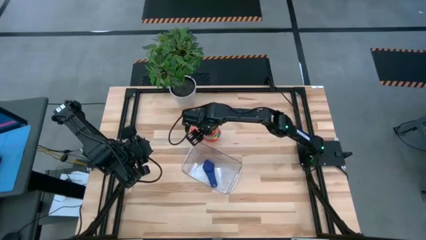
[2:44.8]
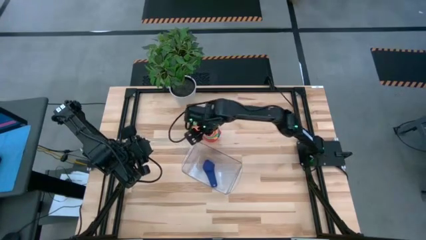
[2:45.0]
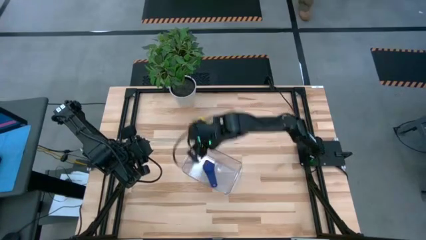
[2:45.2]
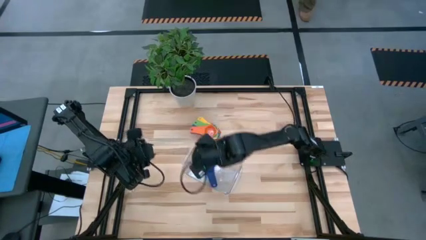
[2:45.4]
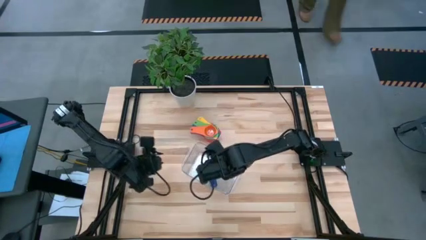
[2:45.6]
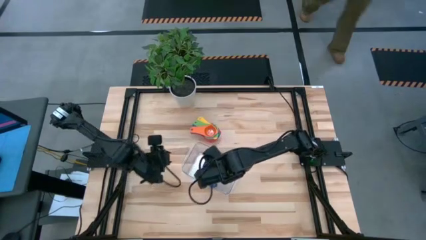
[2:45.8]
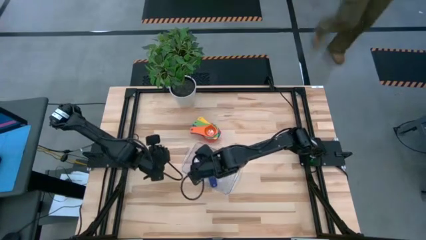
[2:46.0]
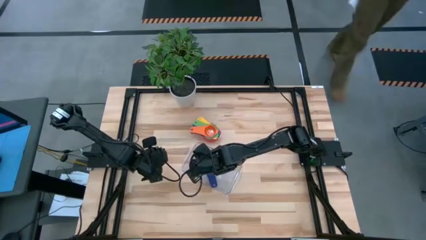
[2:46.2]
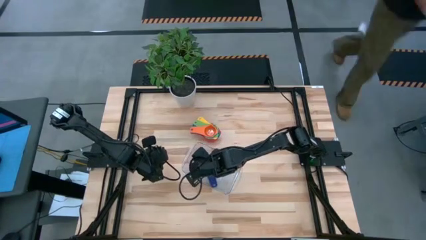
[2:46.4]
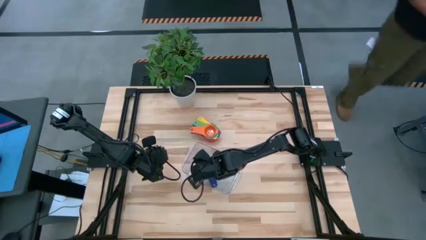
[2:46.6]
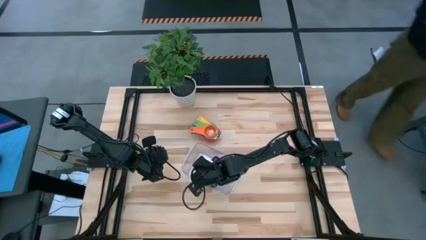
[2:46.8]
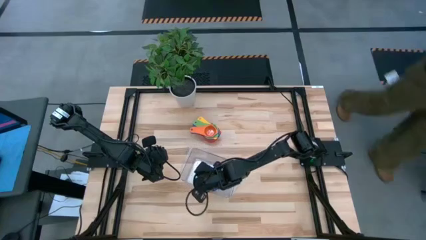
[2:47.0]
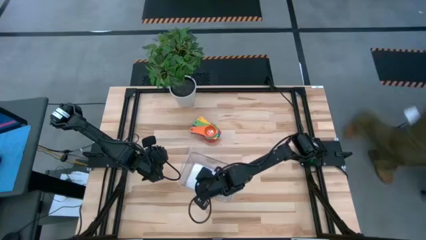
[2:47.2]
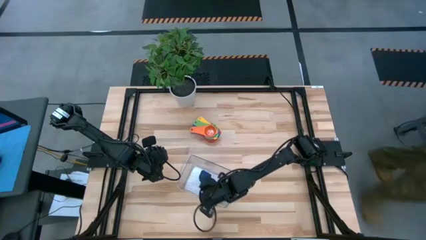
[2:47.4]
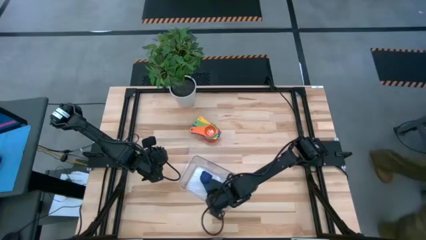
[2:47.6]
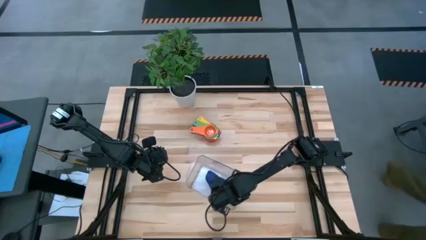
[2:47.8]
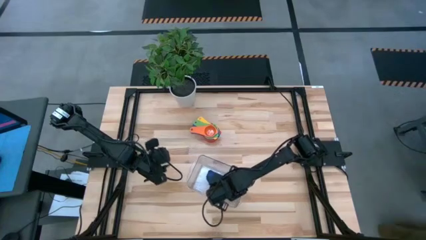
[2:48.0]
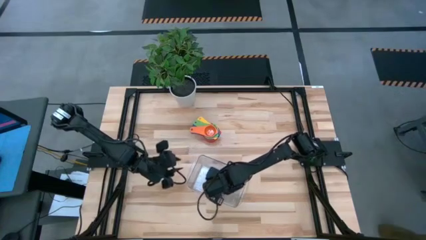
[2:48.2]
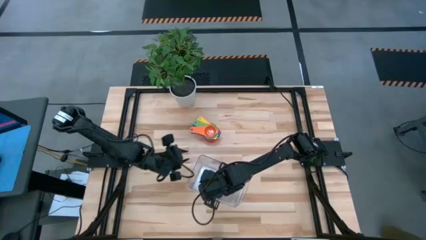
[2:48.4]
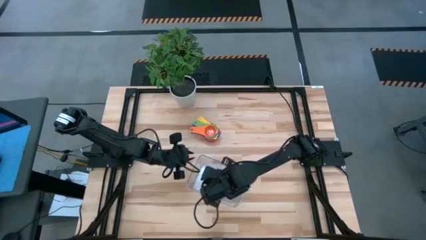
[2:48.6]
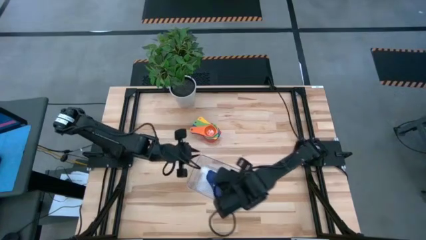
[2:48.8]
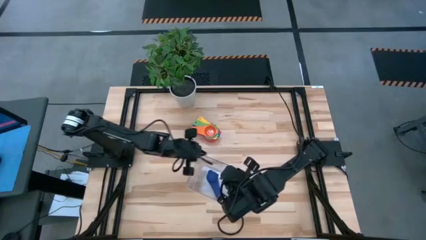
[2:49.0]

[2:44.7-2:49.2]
Task: Nest measuring cups in basket
Adjust the transparent bin on the table

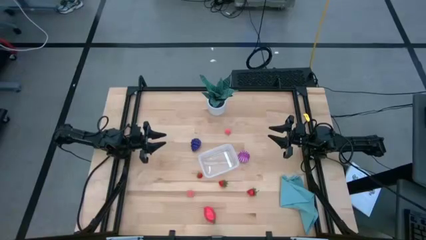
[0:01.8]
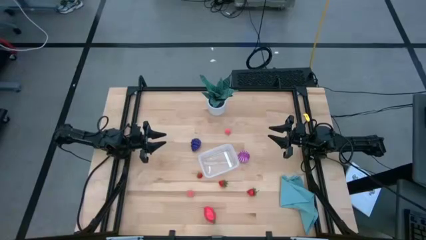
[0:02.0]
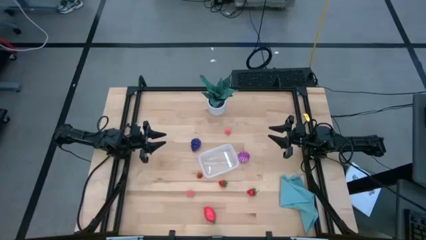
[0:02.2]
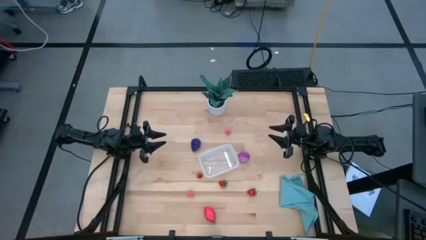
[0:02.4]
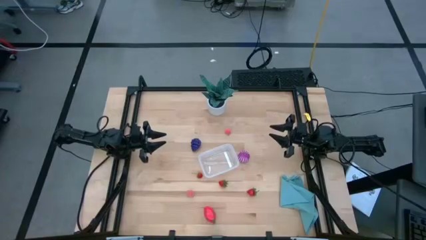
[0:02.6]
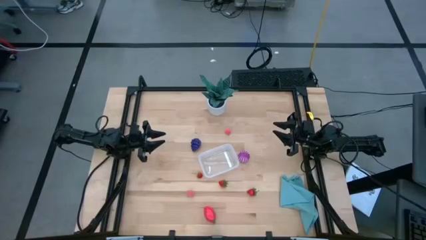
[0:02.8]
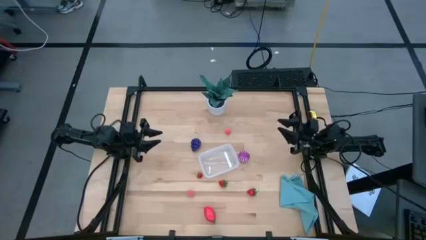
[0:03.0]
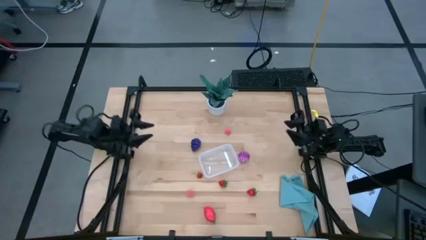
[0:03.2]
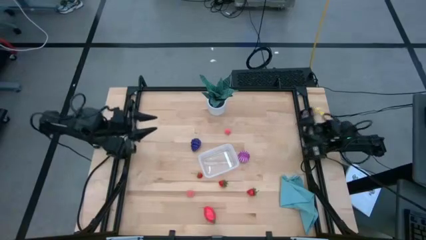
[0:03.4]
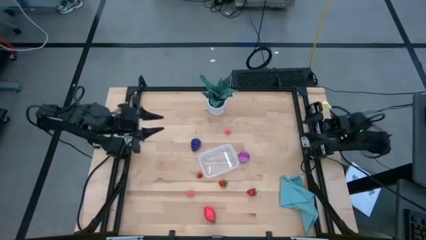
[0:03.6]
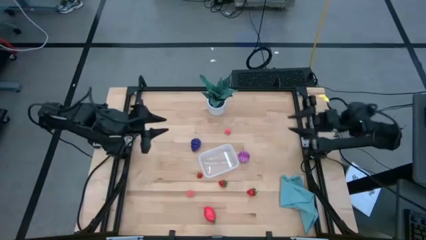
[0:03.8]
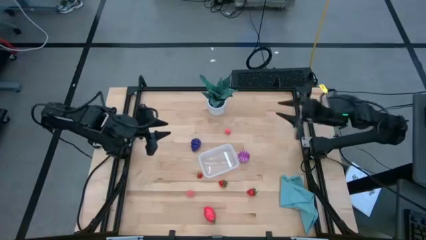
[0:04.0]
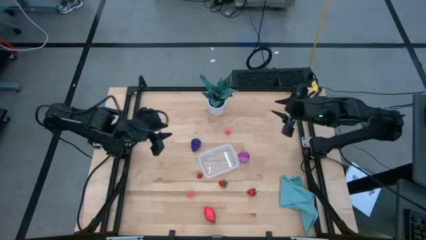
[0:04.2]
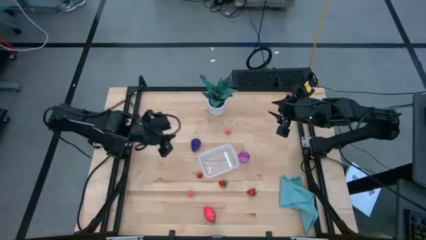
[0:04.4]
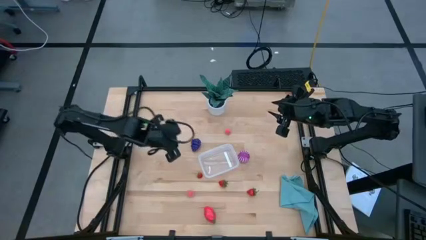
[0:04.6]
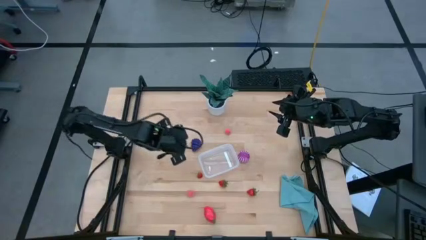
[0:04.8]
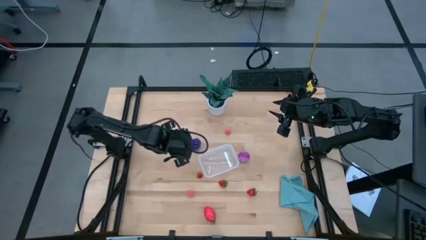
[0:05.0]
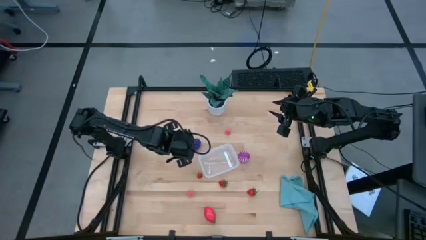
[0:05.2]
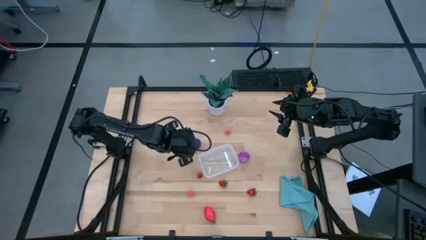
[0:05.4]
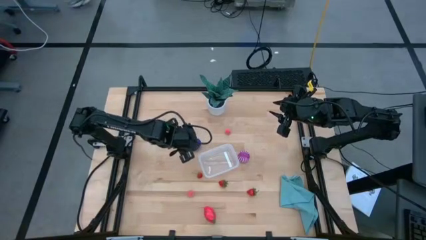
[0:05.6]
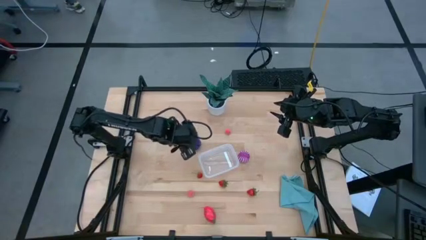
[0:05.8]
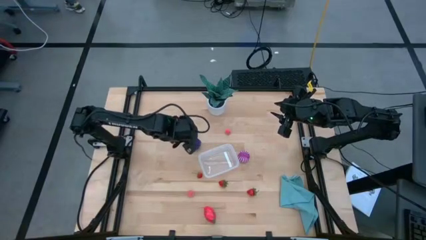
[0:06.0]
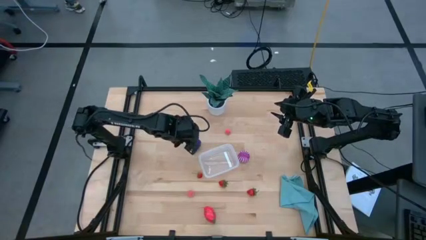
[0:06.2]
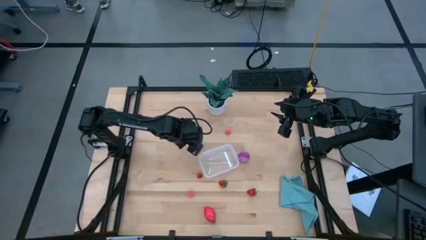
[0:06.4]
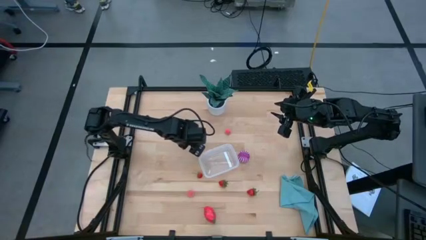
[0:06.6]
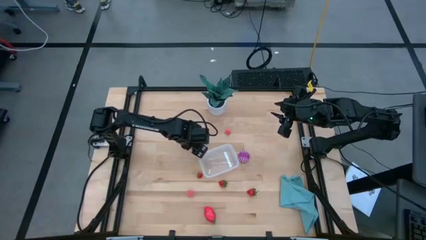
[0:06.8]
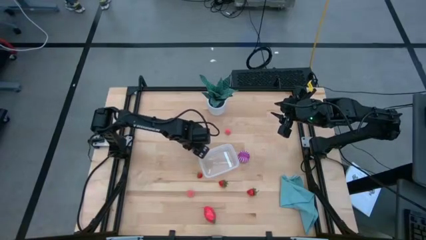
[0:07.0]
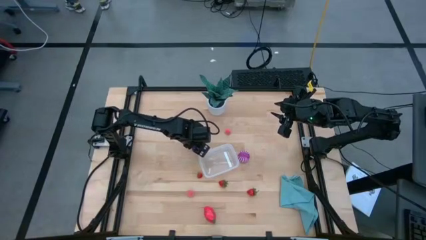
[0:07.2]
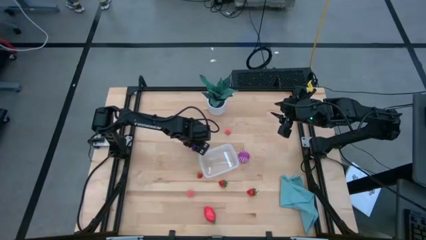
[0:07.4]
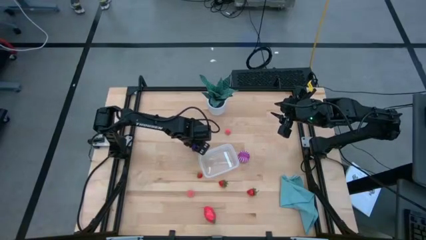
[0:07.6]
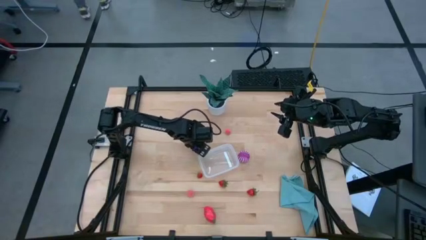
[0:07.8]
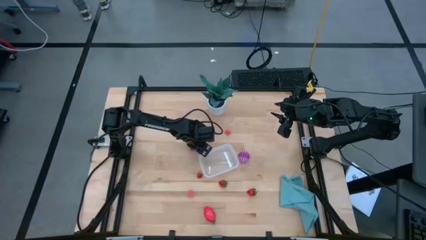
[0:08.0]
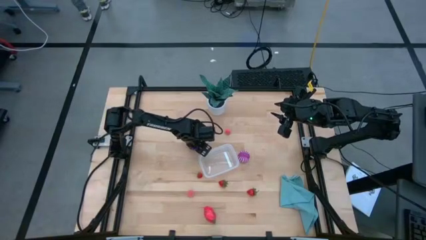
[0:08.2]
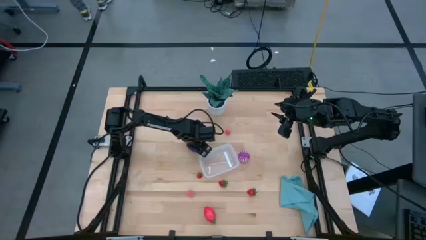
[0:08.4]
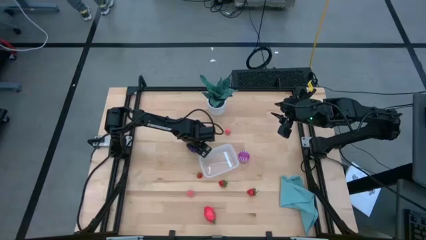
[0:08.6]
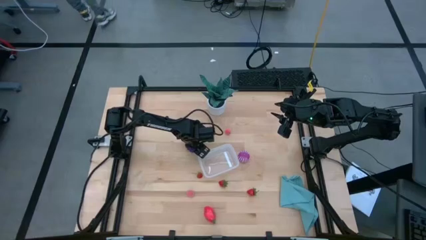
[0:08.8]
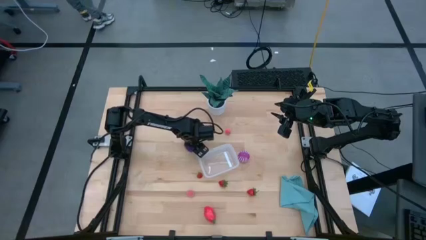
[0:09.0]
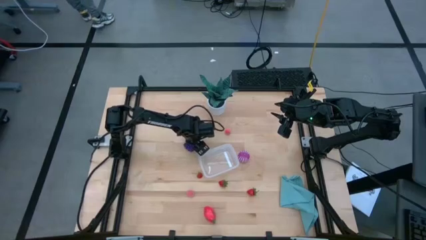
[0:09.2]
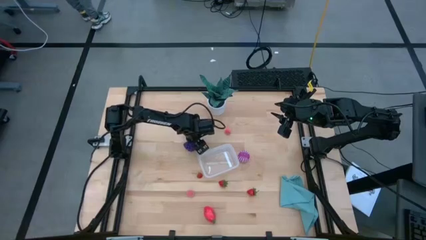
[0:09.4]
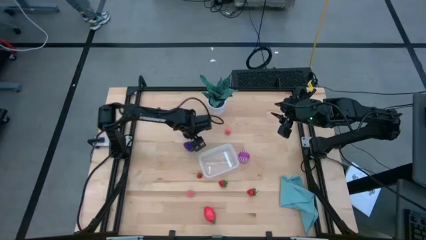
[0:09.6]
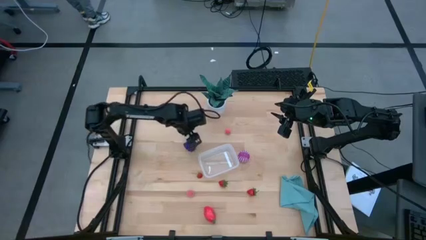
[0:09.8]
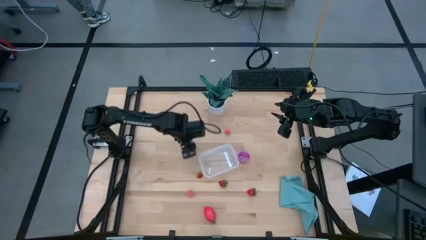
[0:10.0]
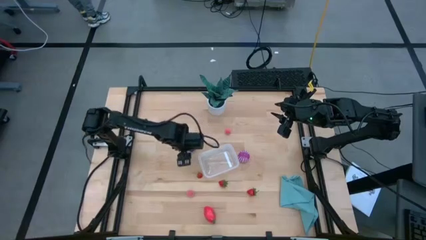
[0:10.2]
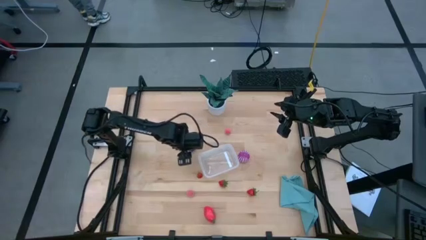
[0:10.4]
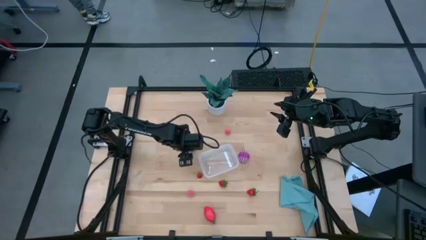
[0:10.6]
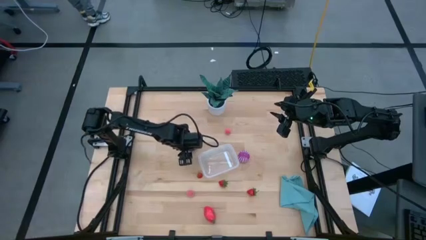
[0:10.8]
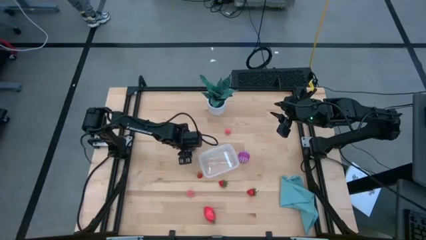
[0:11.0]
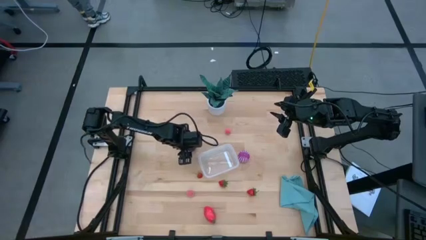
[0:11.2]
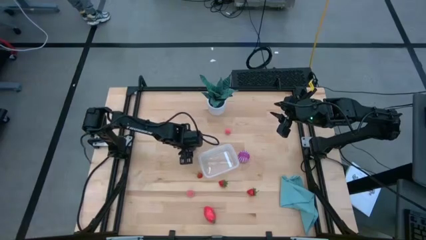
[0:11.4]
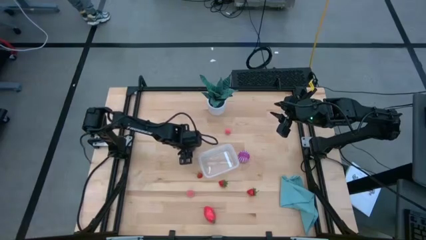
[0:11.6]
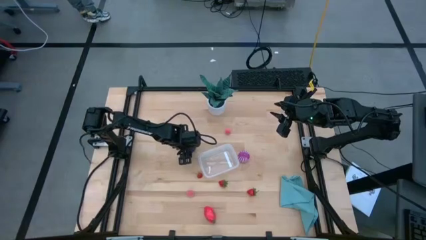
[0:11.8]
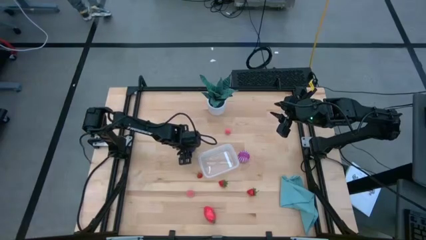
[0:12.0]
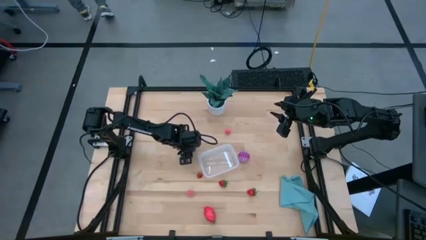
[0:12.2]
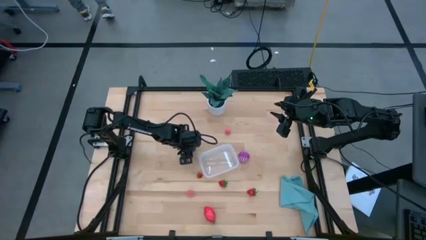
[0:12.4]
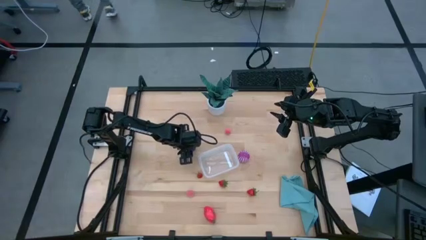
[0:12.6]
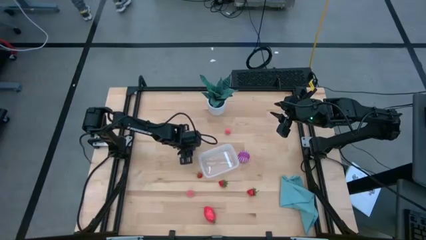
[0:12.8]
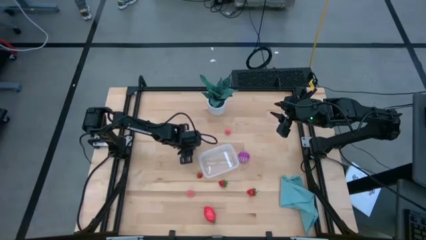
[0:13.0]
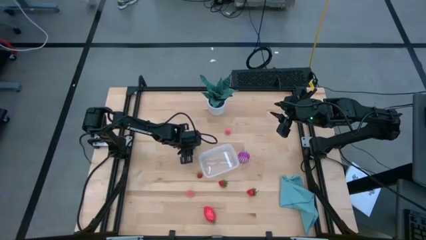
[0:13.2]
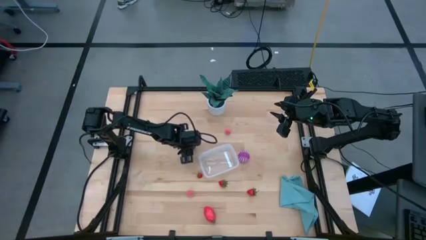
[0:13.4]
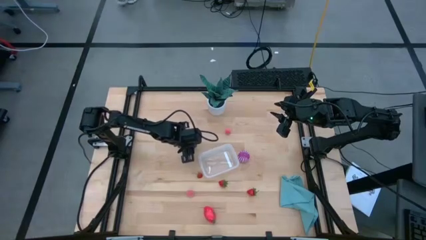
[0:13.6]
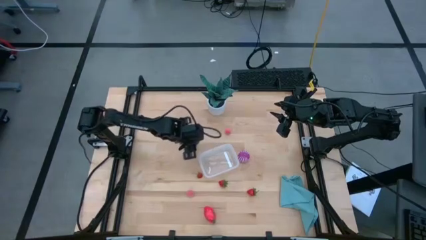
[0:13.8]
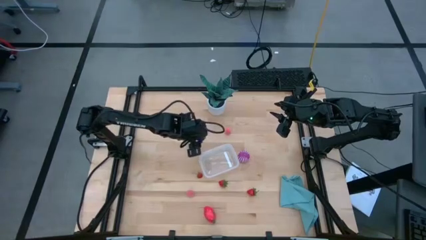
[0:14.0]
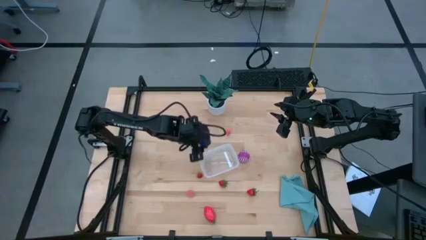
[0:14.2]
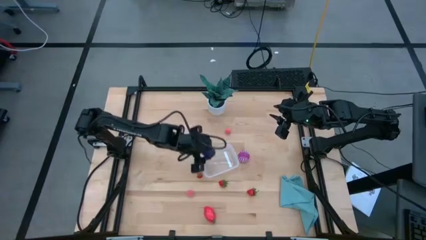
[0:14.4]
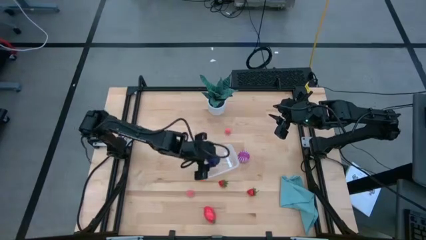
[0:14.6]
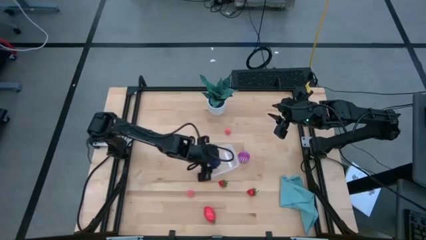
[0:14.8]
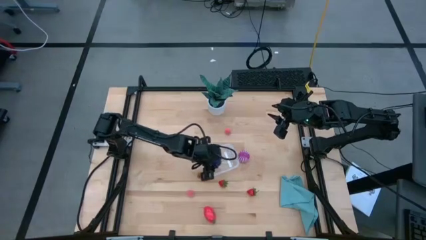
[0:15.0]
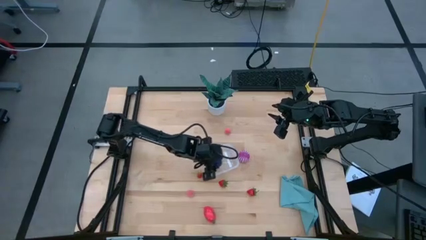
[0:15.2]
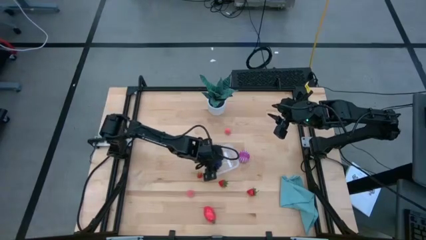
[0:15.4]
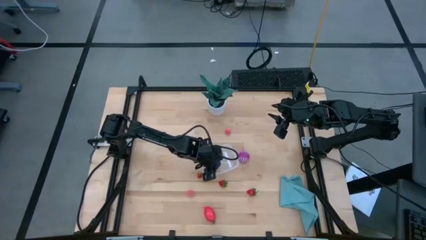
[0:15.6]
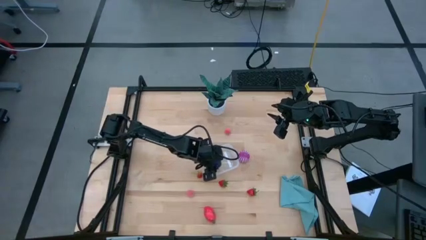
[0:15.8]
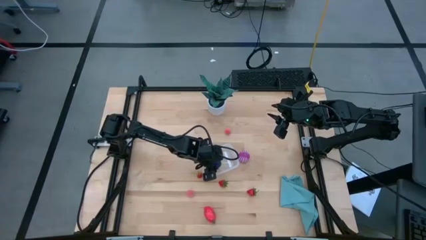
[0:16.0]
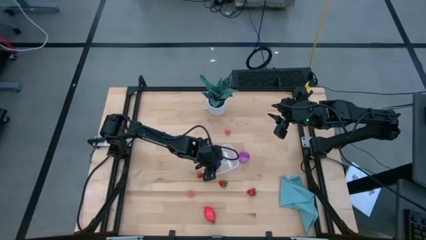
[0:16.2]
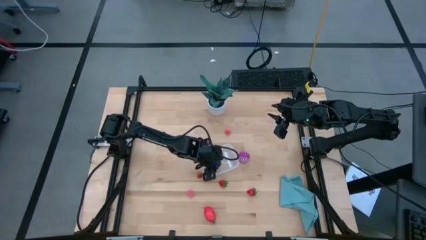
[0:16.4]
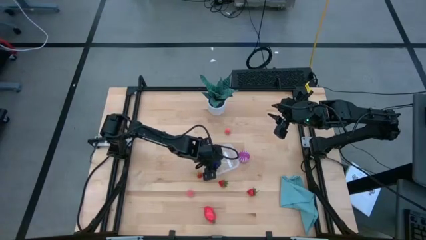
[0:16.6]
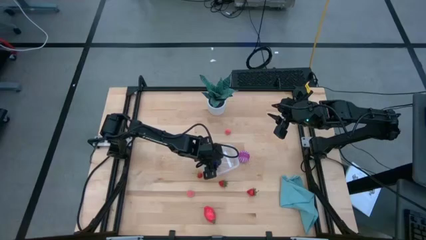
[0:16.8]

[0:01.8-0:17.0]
Task: Pick and placing Produce into tupperware
Put the grapes into the transparent bin
